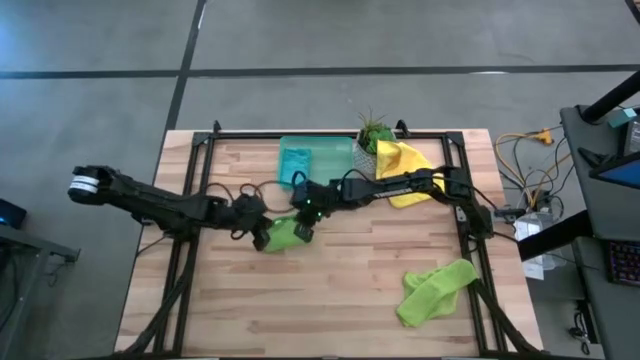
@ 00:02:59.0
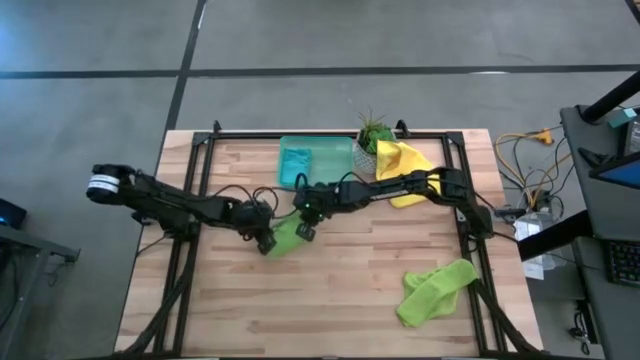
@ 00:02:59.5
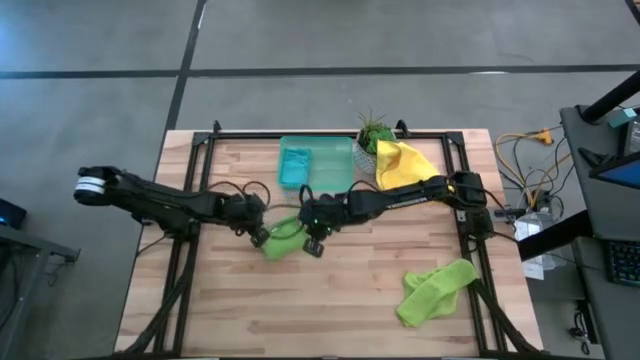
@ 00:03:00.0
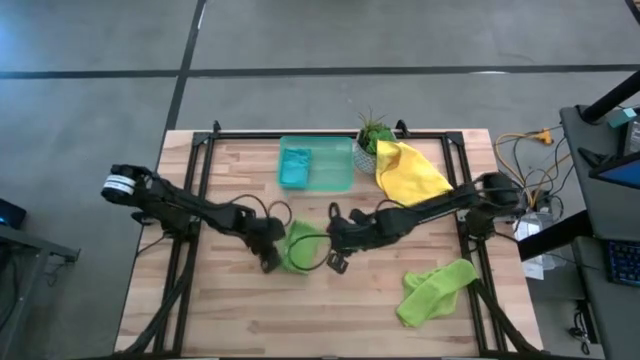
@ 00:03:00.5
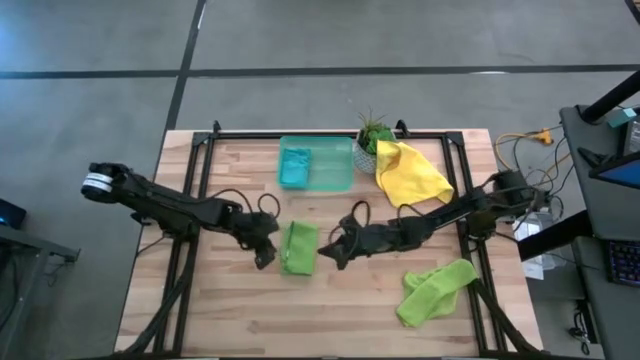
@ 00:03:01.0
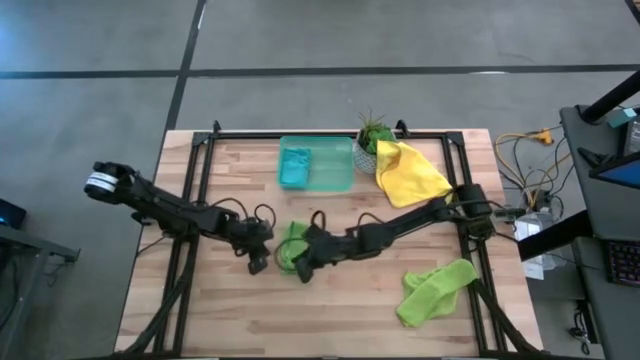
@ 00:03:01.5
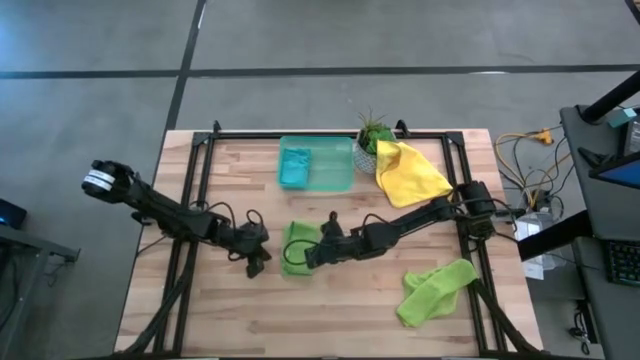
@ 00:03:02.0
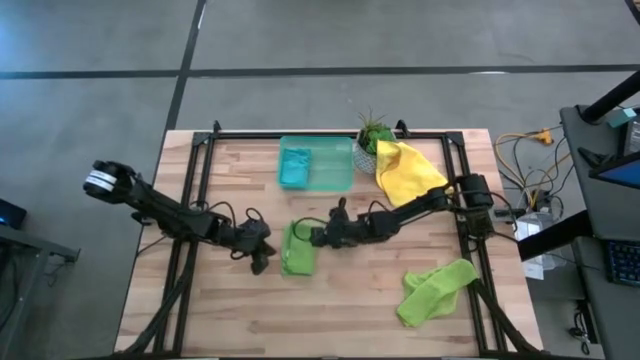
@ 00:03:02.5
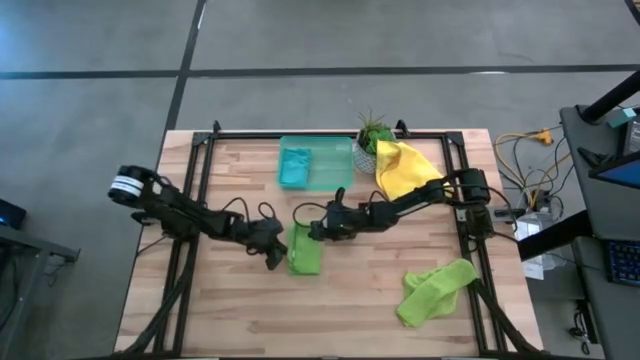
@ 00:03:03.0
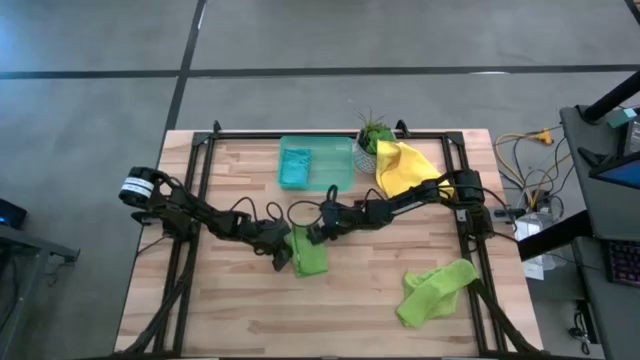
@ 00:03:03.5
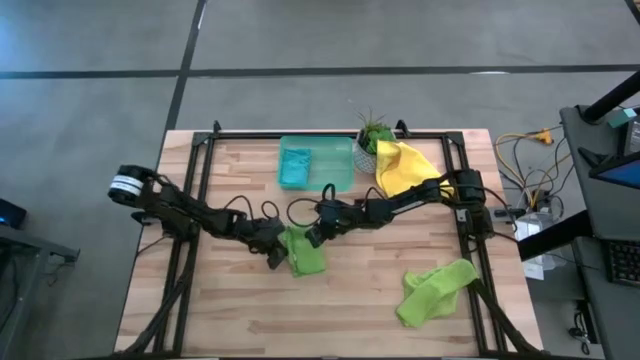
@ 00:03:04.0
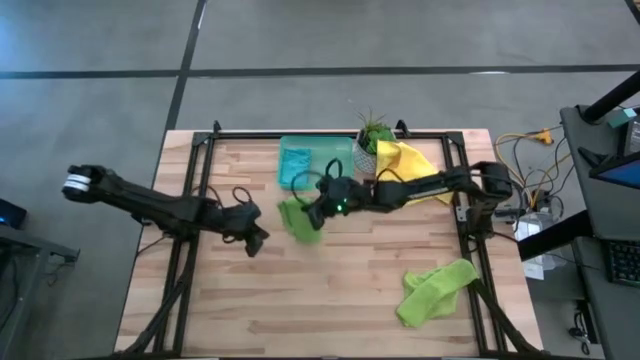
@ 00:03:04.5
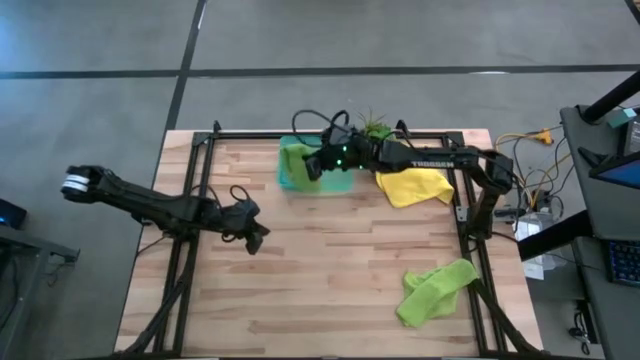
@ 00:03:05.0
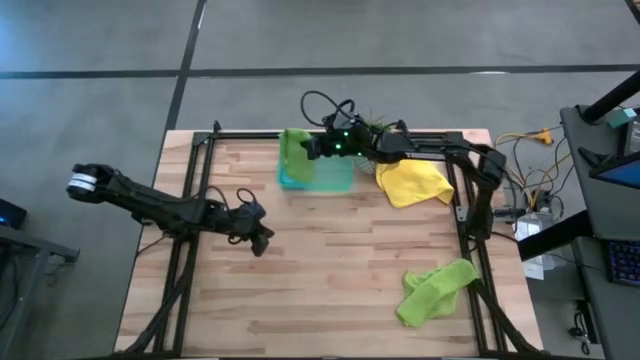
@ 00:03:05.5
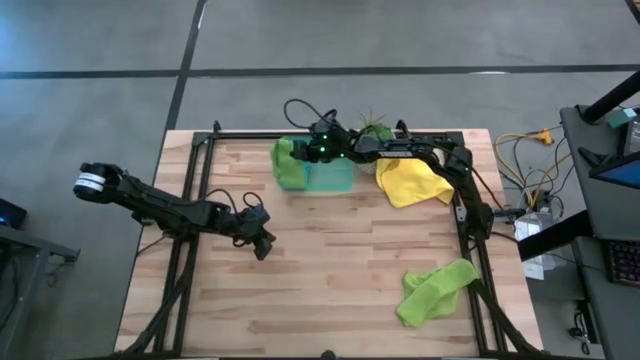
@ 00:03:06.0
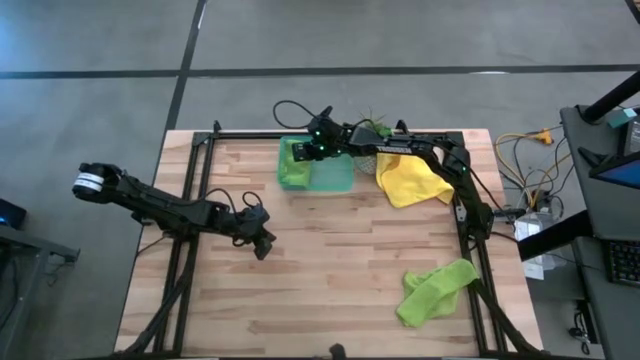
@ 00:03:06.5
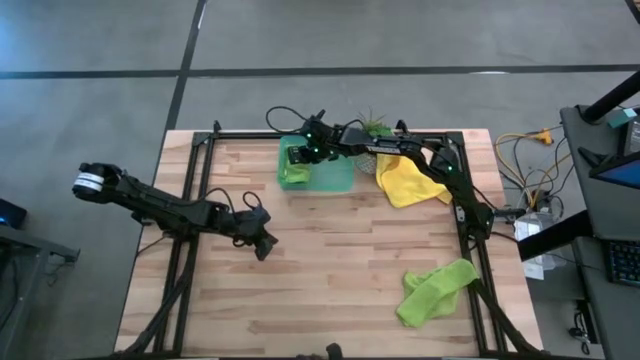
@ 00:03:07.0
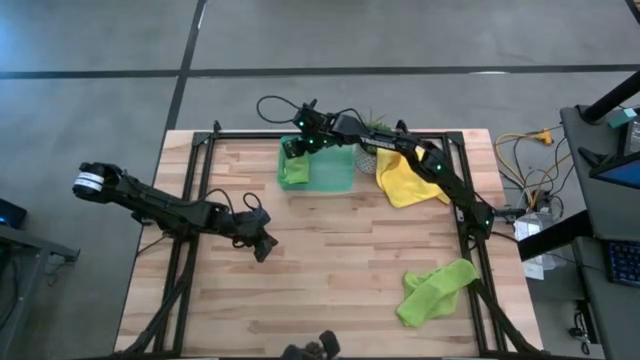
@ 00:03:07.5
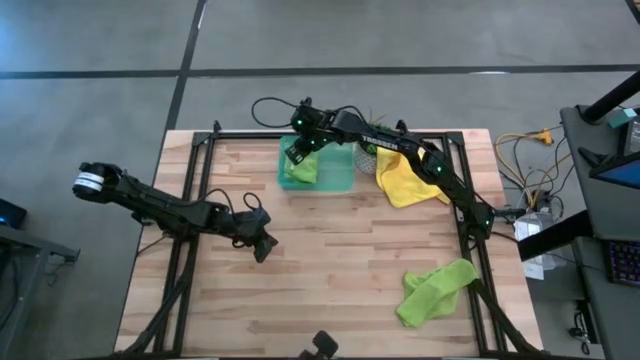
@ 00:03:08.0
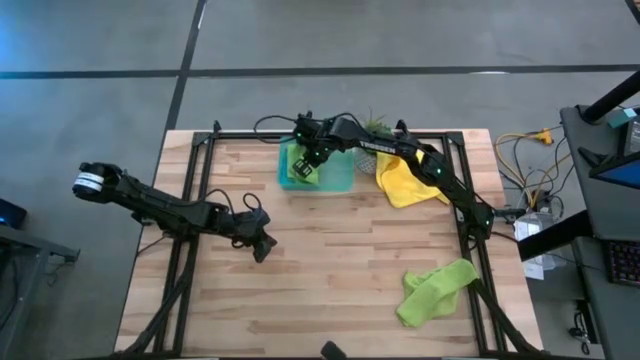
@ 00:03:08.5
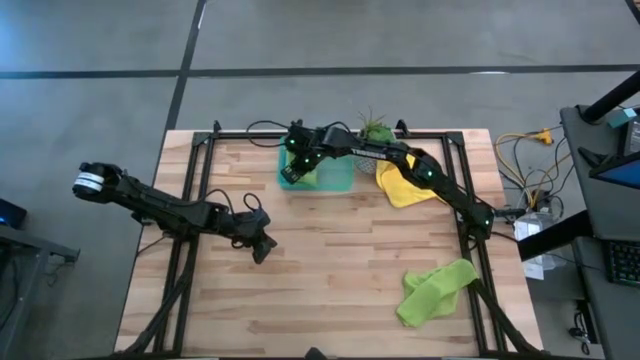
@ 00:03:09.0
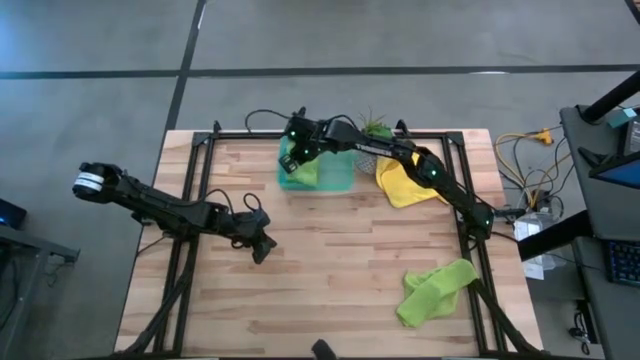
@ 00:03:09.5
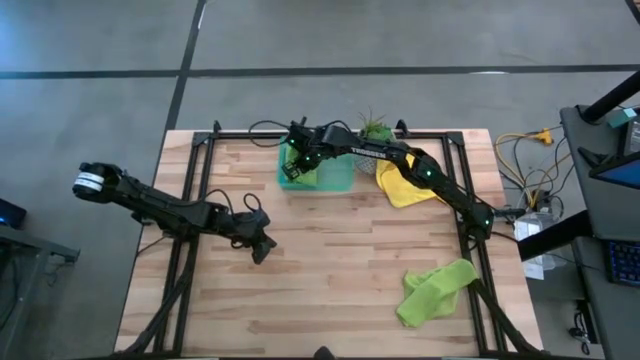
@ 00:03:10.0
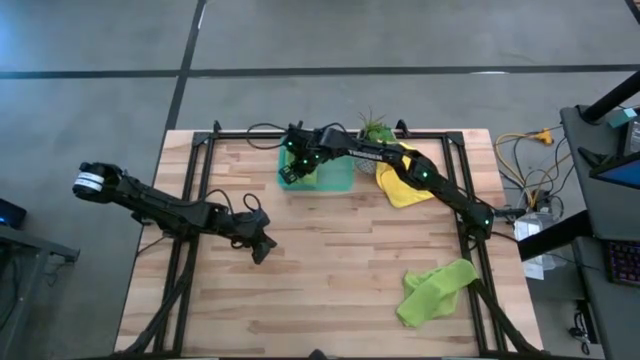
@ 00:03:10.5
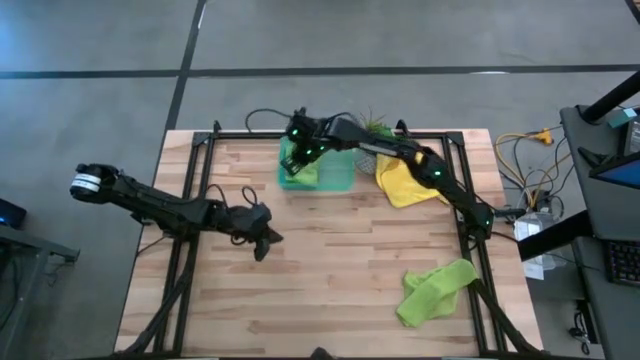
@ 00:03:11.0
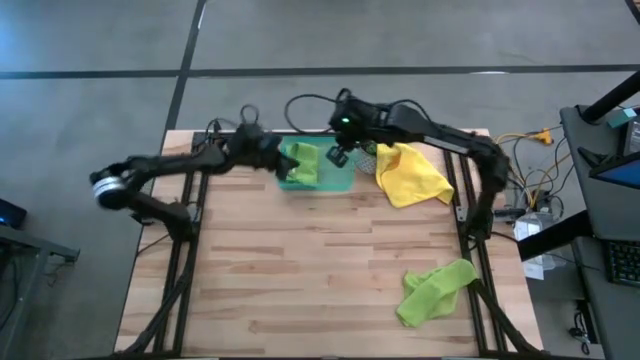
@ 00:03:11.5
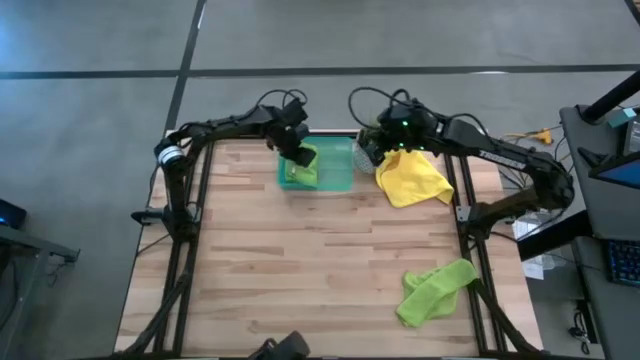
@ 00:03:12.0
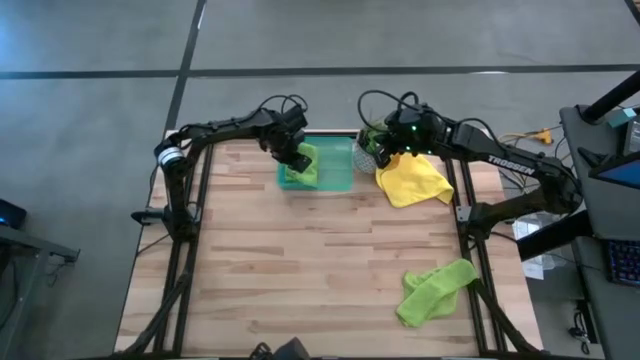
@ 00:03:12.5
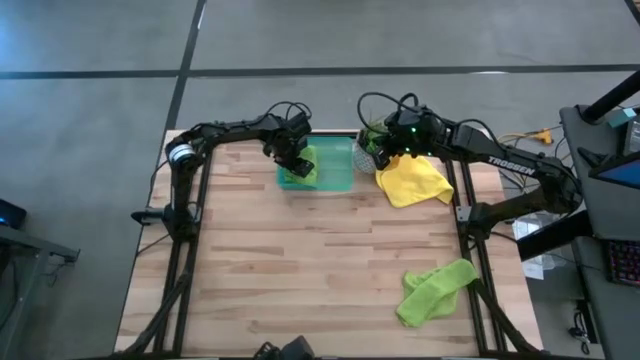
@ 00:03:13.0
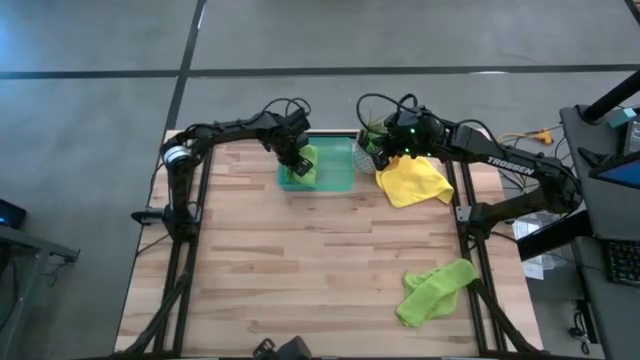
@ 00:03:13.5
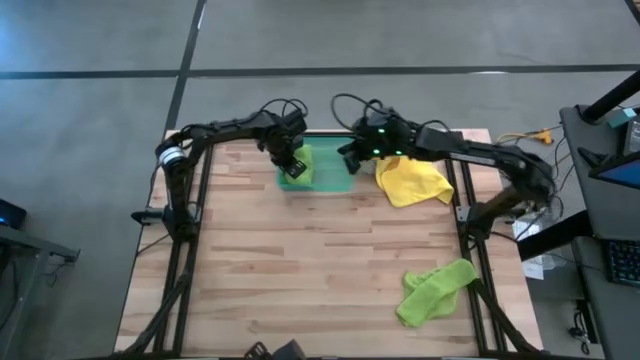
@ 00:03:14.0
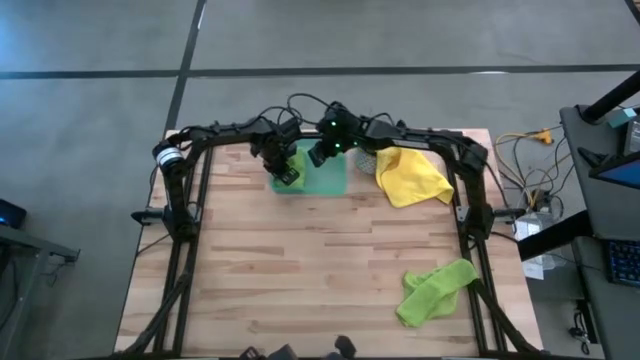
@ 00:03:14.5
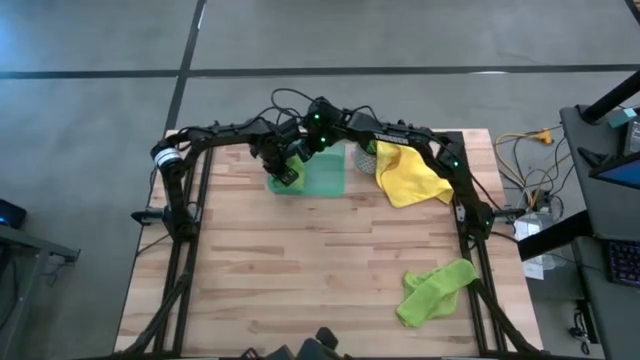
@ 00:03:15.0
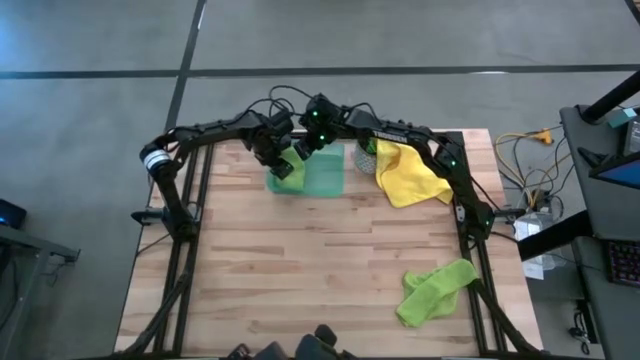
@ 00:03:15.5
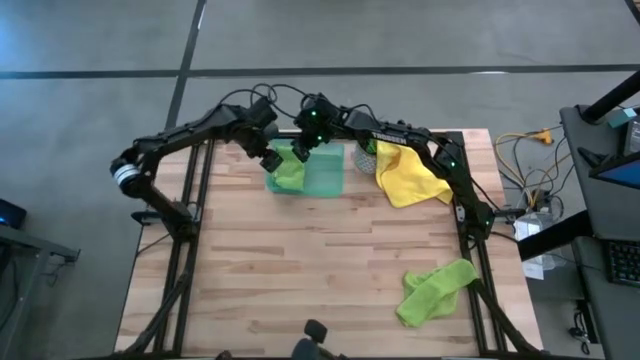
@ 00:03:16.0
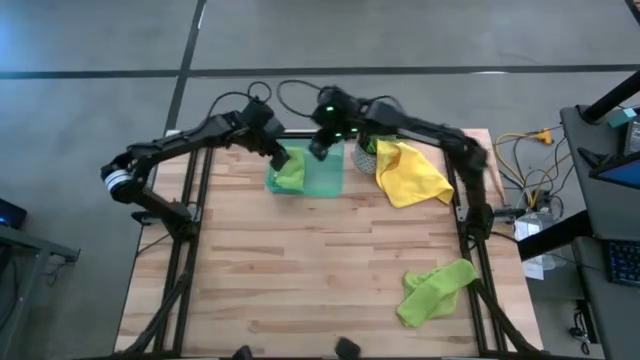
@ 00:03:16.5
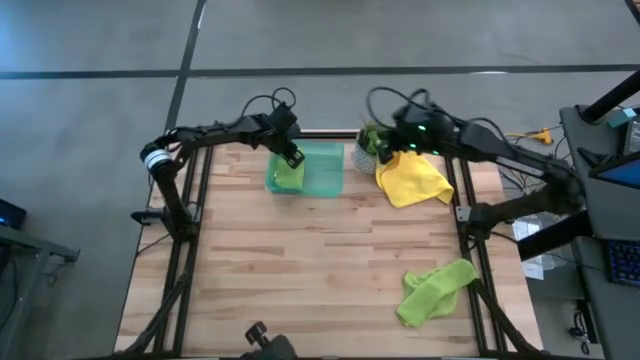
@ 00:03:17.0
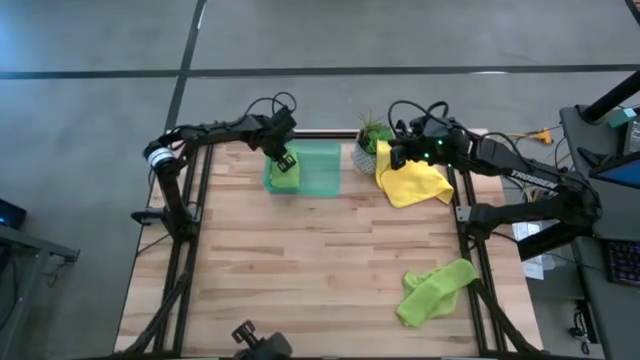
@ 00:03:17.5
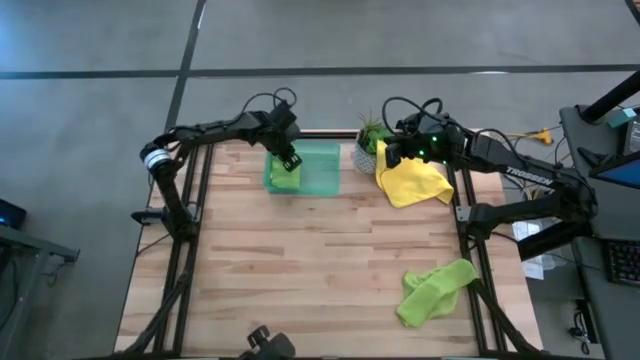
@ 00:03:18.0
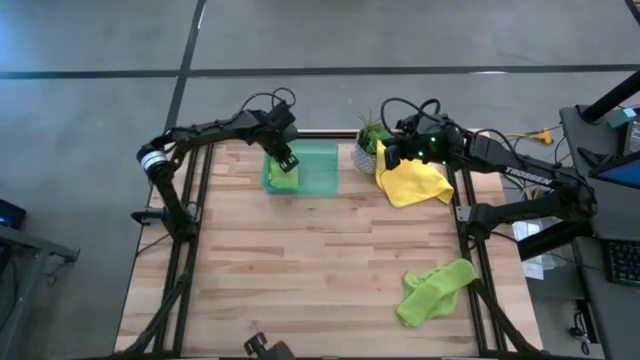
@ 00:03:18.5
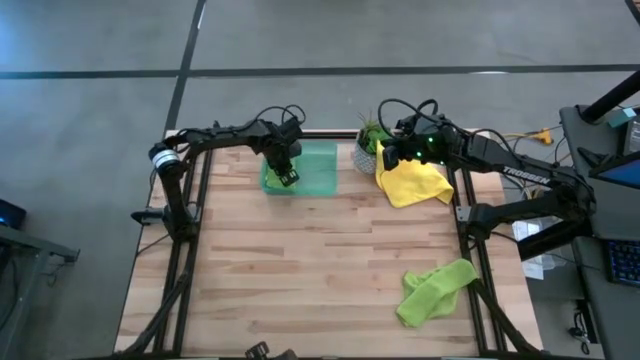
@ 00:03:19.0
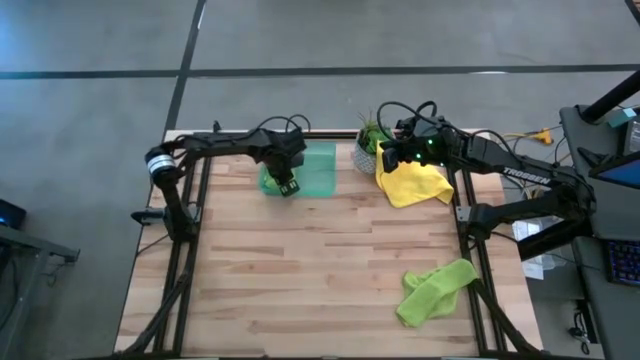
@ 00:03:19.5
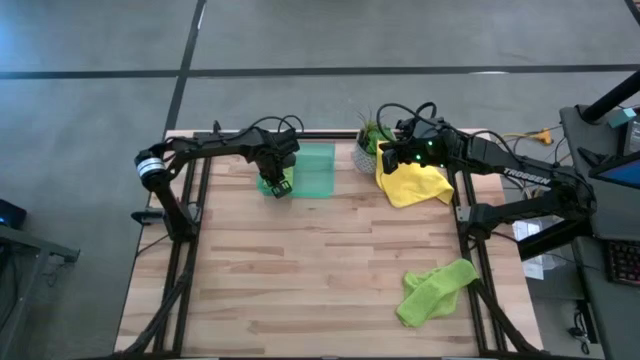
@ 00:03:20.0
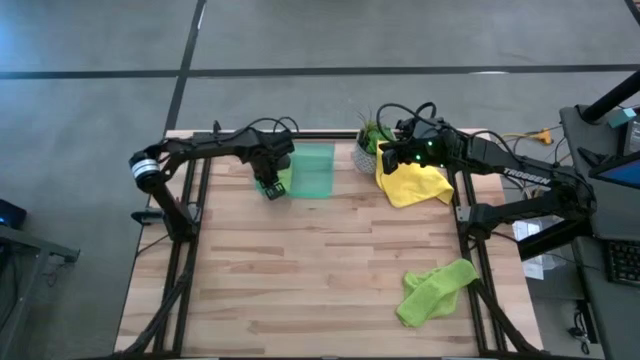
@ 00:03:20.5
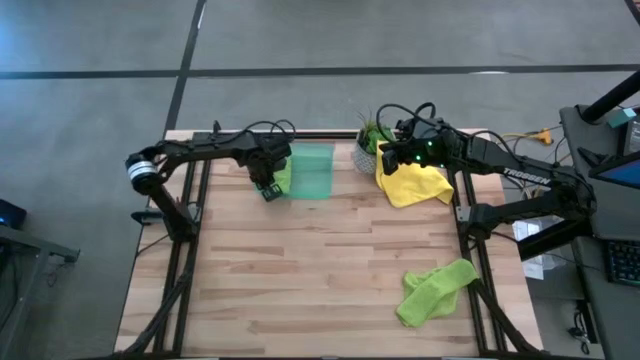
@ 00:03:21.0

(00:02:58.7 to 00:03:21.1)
Task: Fold microfiber towels
Put the folded green microfiber towel into the blue bin
